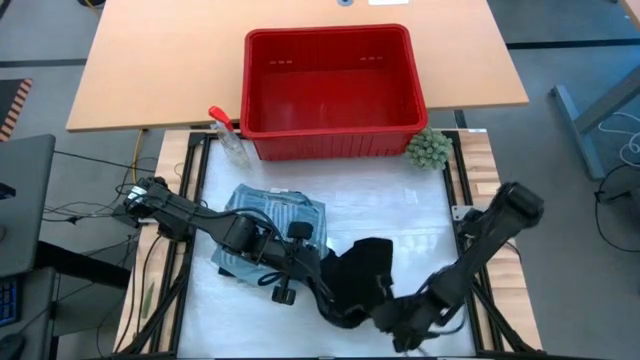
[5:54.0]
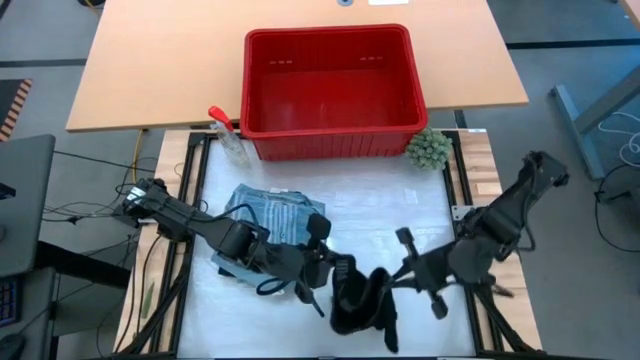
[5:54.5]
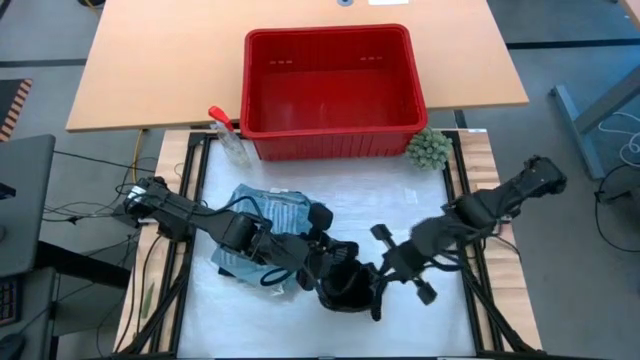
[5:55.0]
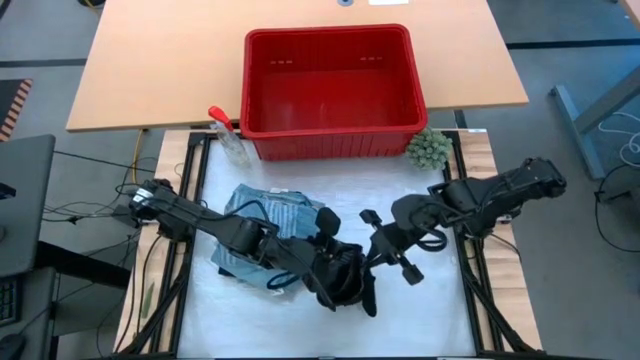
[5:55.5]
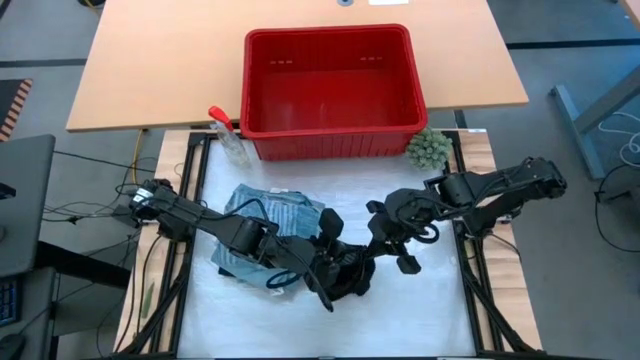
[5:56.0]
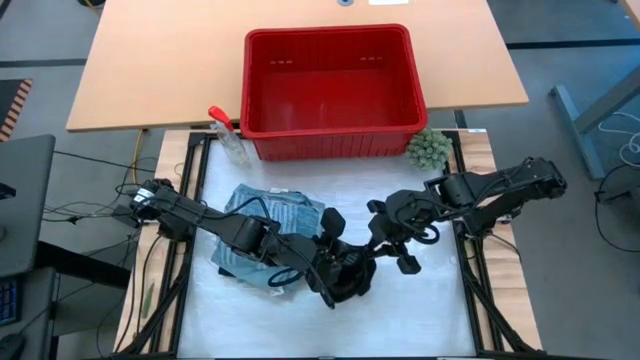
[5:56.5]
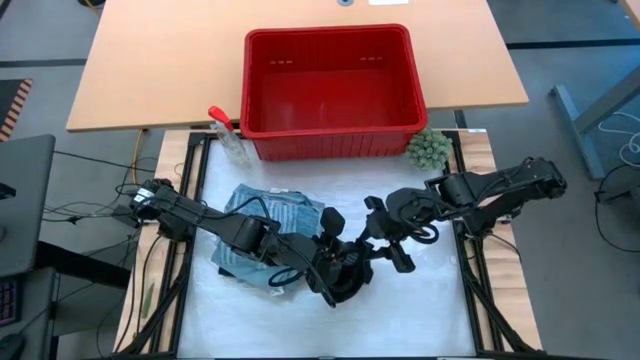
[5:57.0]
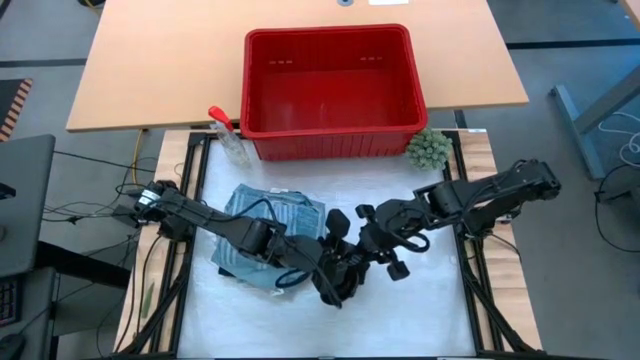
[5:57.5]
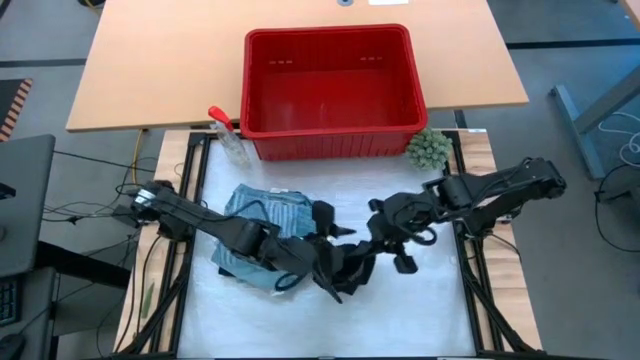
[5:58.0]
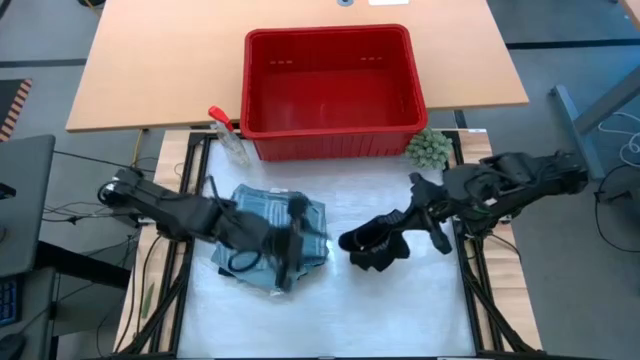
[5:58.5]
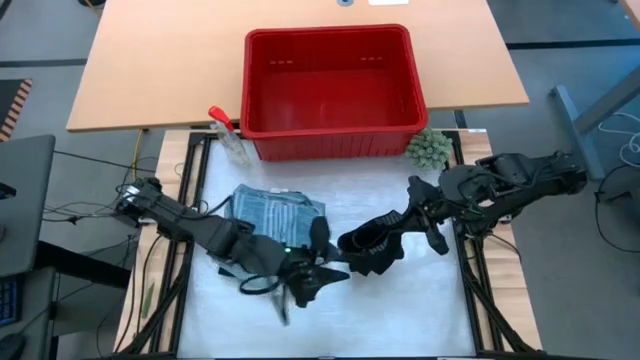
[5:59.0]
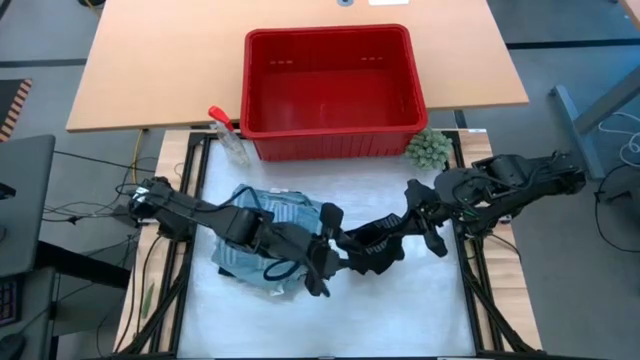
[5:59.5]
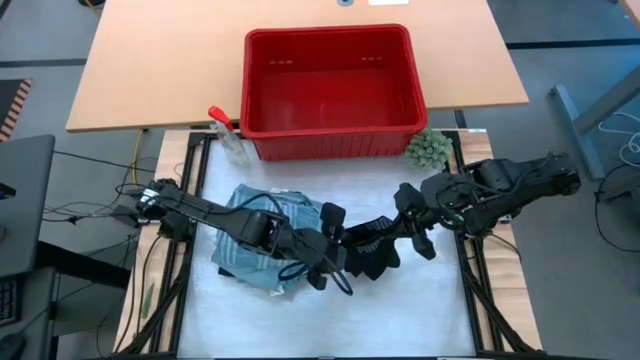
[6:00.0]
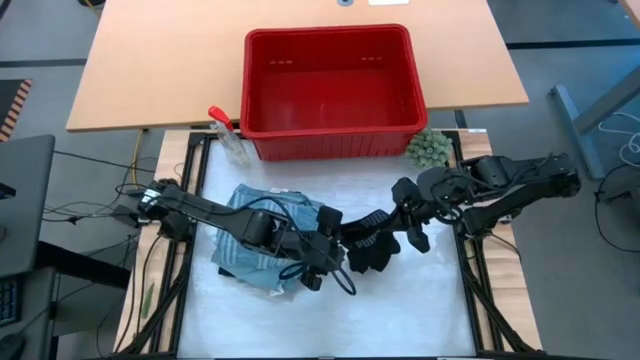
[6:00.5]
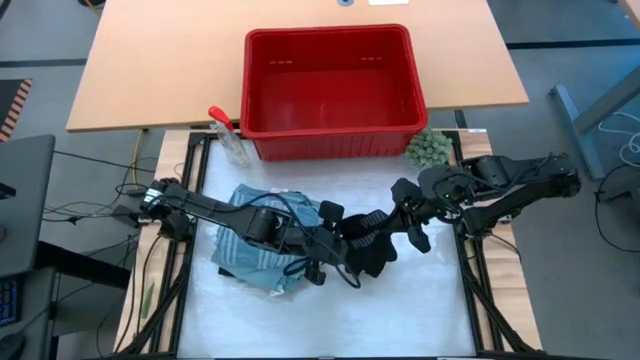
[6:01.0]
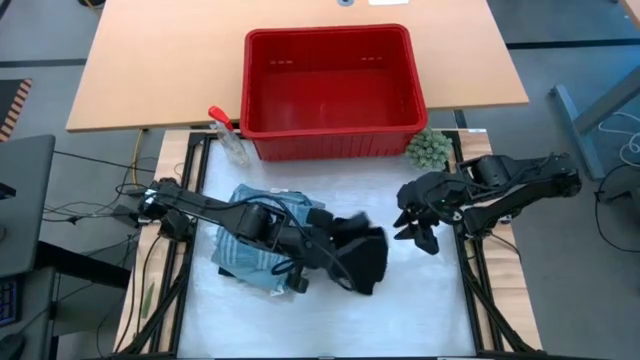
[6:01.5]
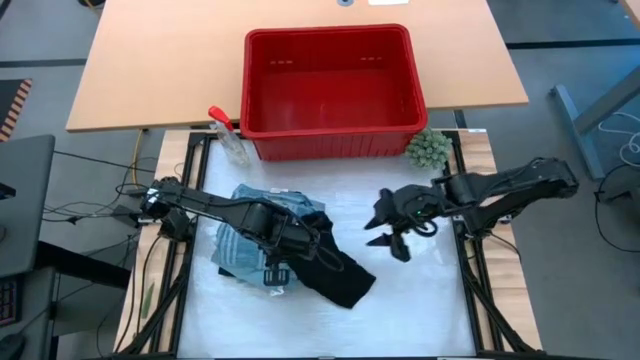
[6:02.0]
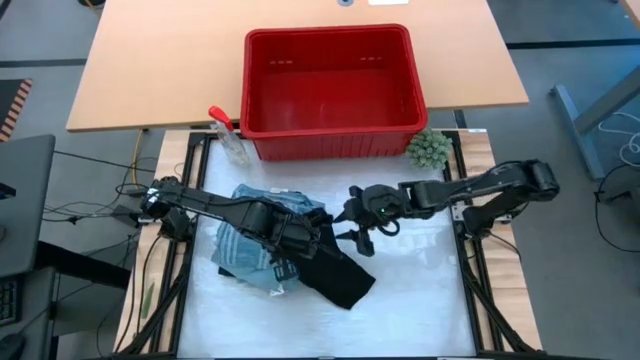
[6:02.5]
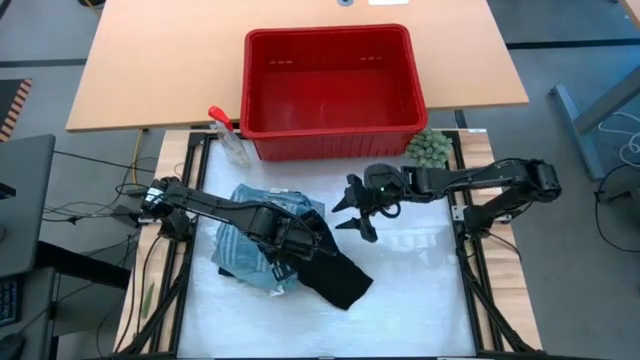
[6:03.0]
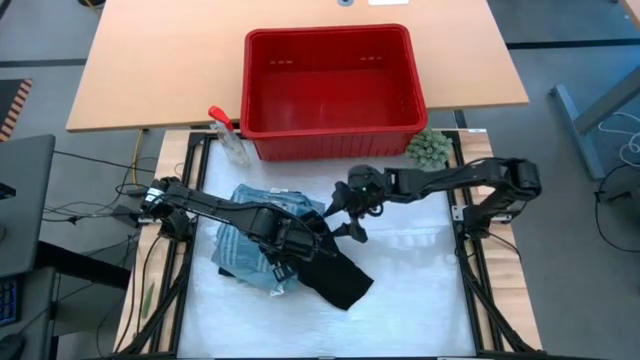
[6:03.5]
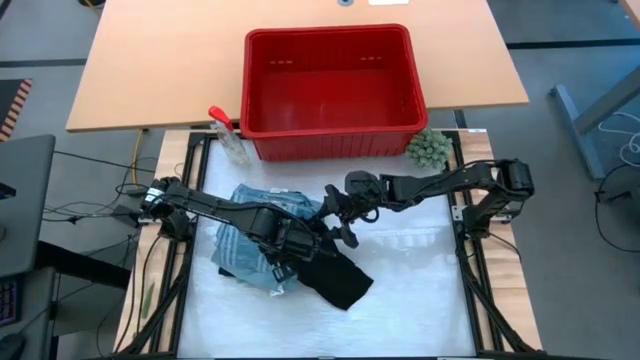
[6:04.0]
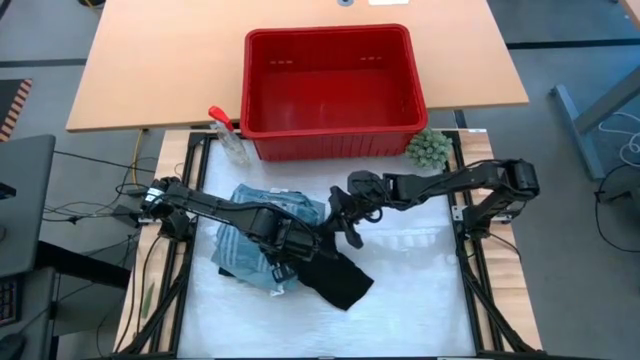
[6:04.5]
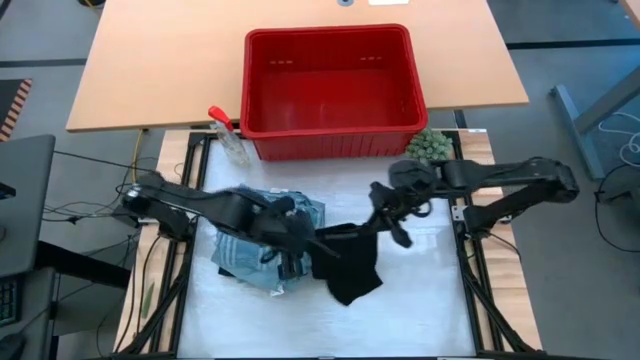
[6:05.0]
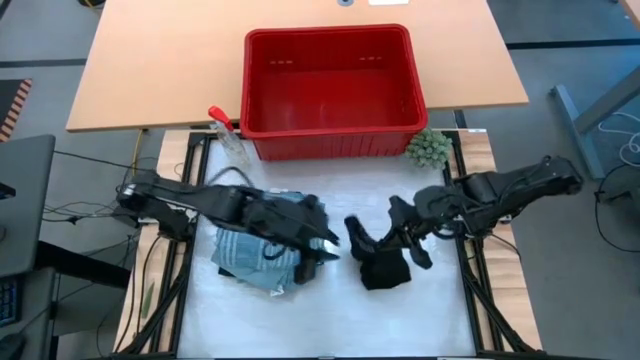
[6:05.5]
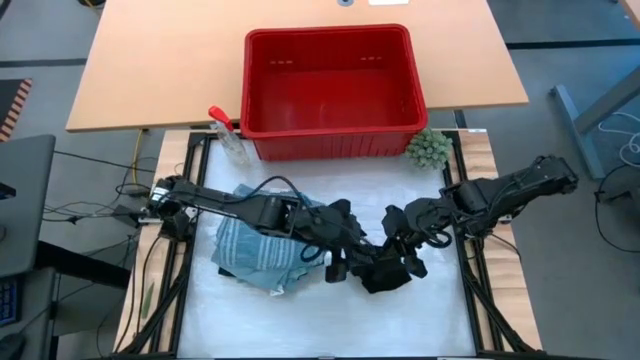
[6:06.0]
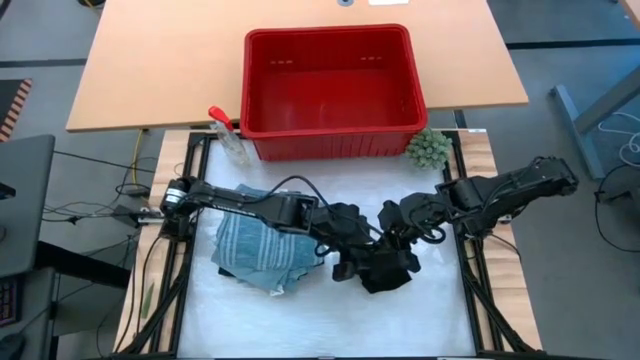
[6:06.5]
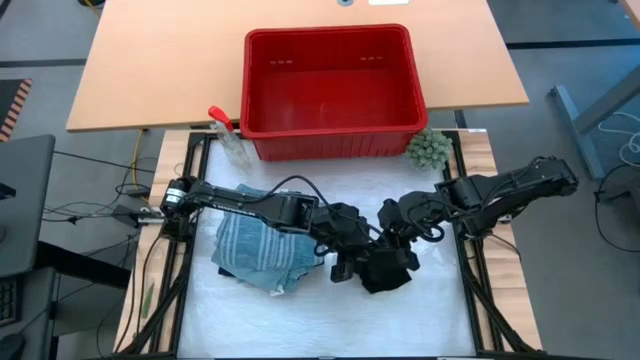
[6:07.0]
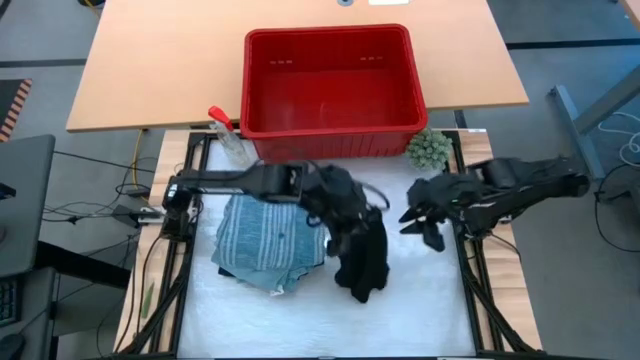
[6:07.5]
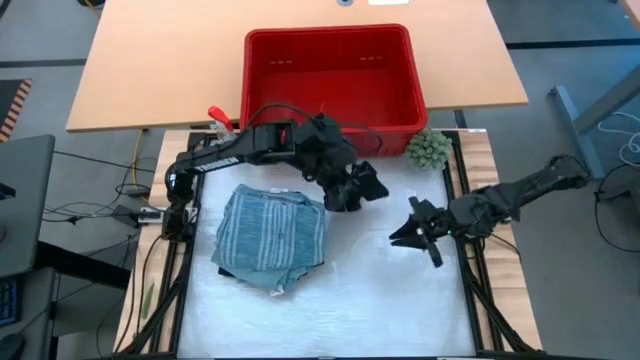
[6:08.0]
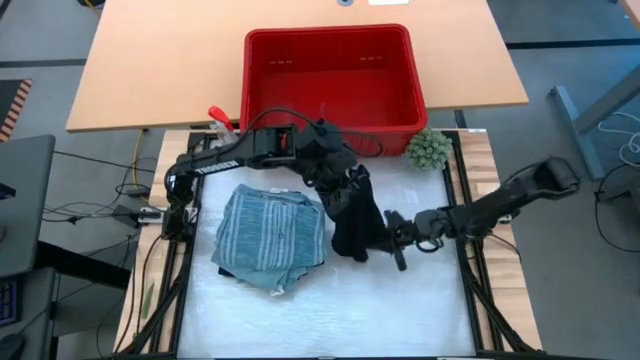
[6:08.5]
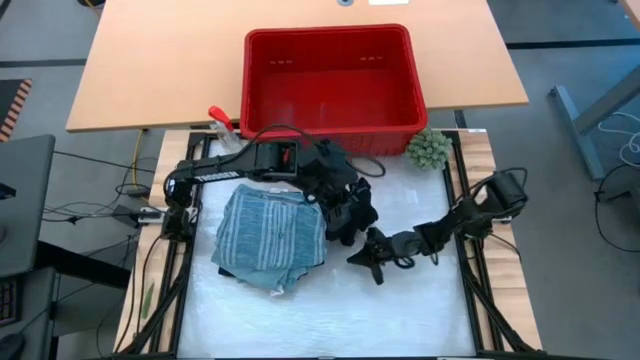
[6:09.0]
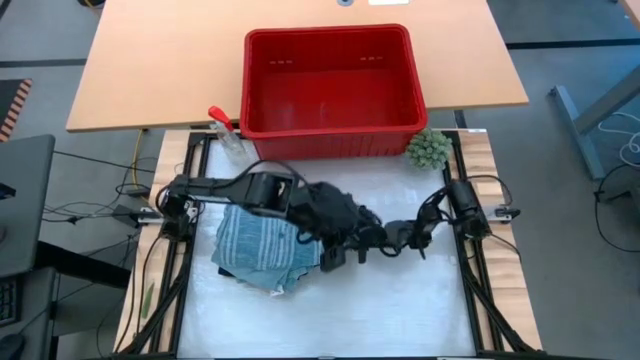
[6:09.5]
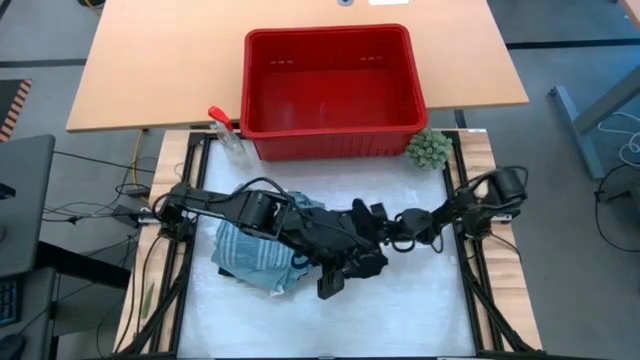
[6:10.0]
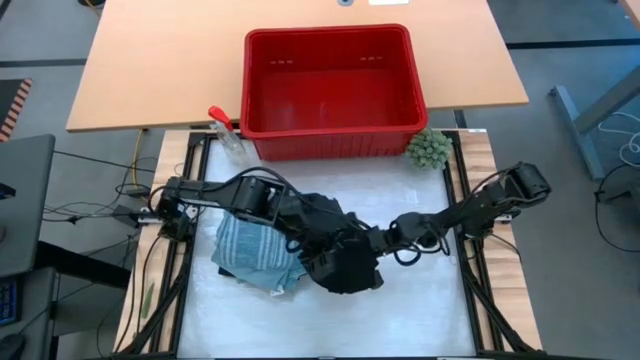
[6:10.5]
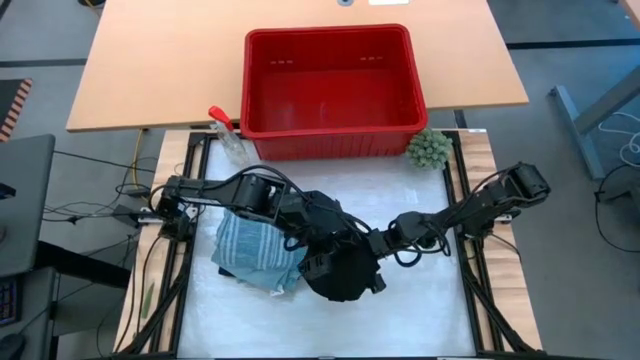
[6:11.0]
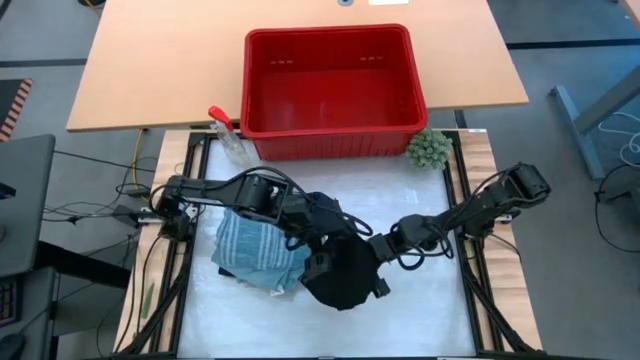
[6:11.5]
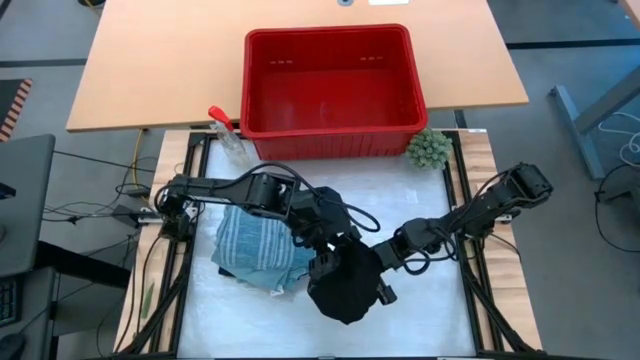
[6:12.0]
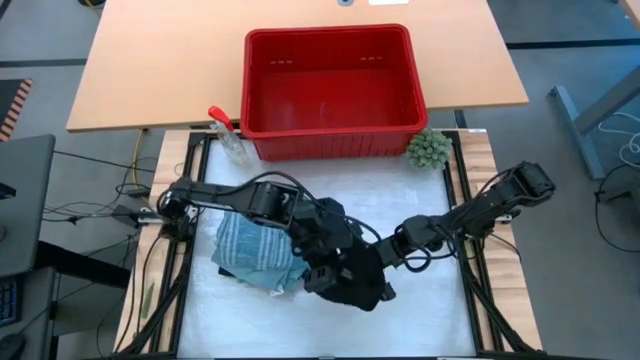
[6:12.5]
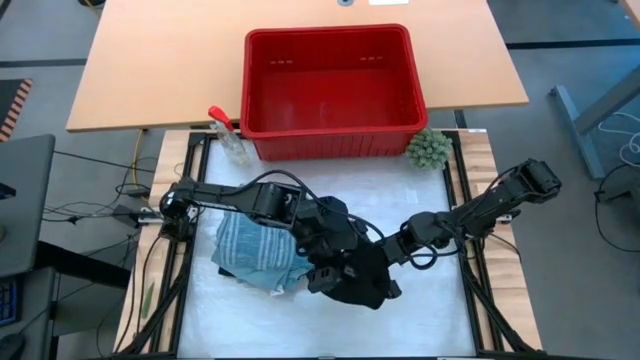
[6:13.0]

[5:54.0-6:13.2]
Task: Fold Laundry from Bin
Fold the black underwear

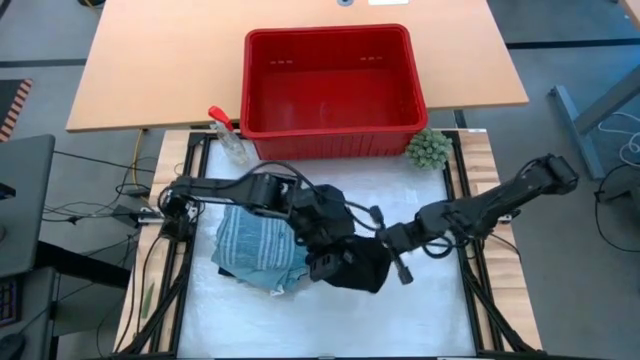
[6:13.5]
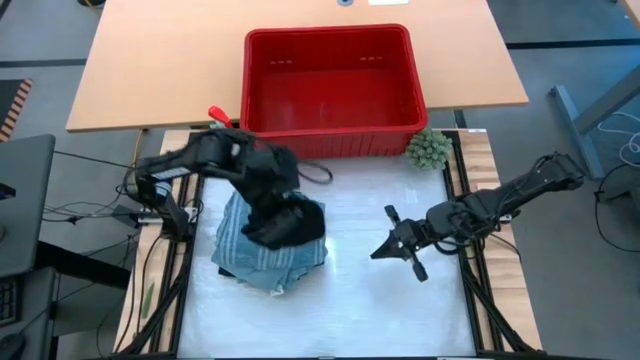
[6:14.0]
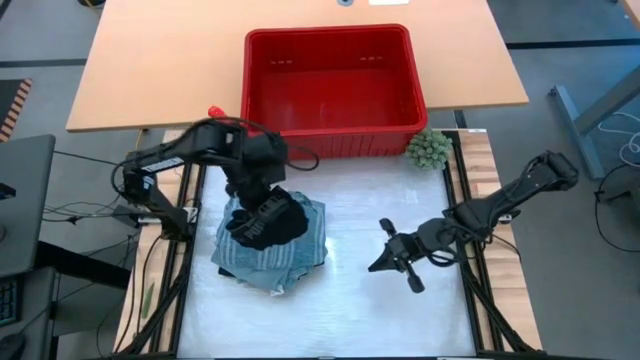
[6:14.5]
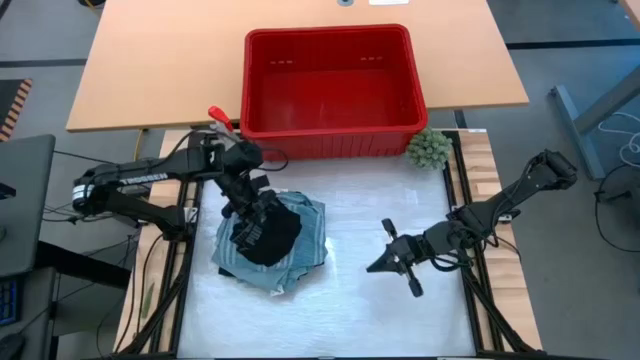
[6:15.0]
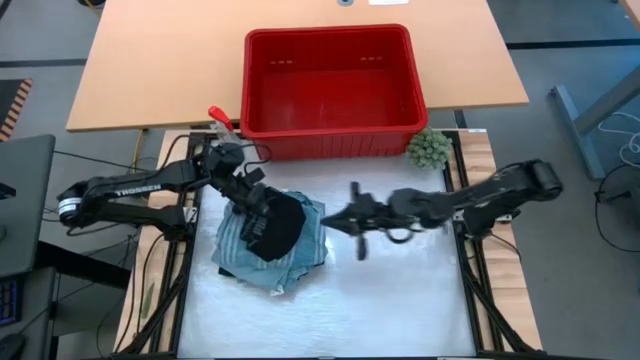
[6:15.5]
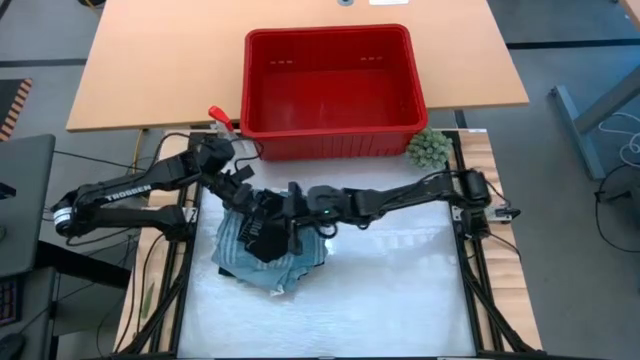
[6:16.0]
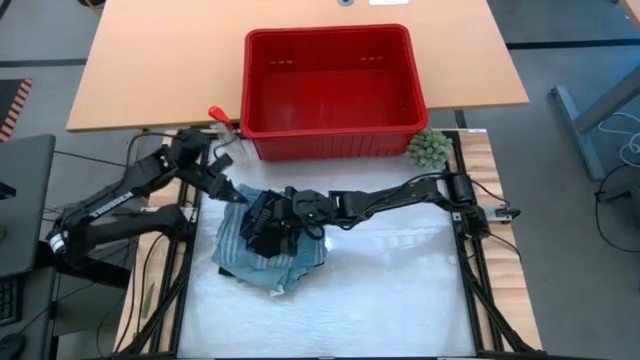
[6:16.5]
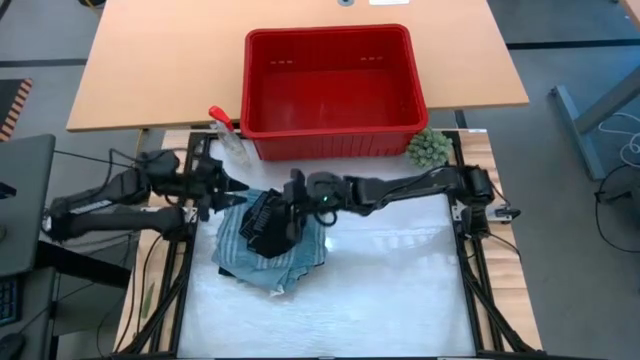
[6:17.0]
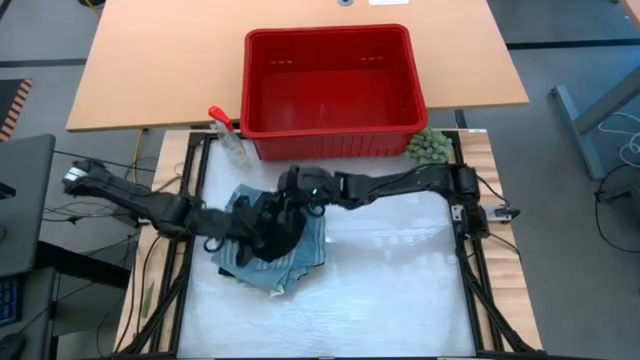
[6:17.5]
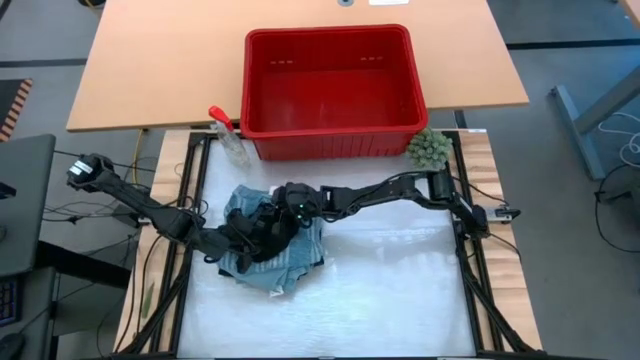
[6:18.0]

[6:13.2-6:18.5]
Stack the black underwear on top of the light blue polo shirt
